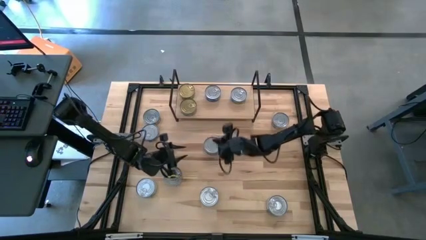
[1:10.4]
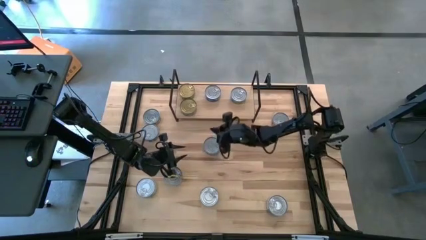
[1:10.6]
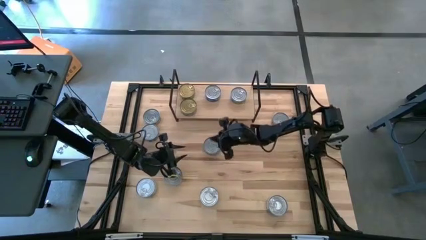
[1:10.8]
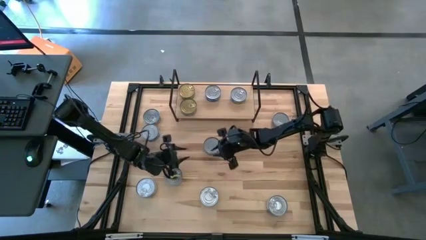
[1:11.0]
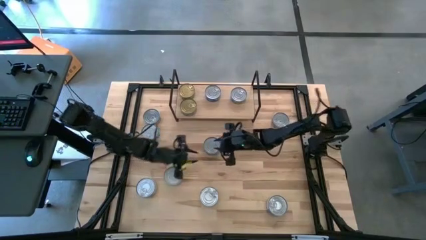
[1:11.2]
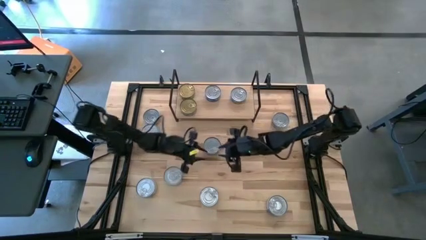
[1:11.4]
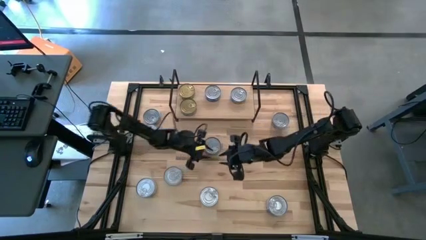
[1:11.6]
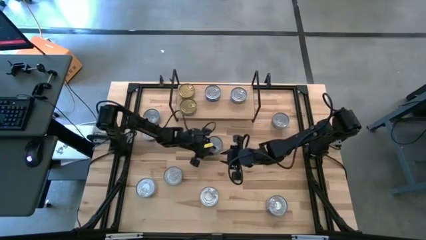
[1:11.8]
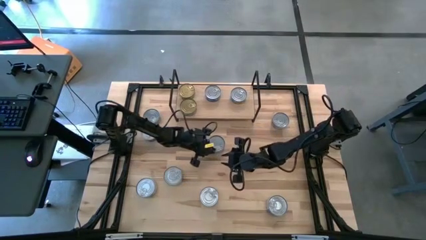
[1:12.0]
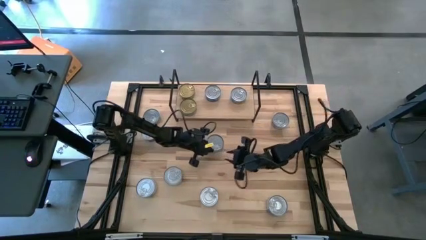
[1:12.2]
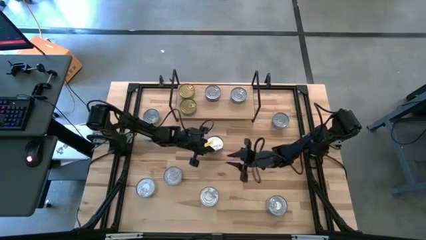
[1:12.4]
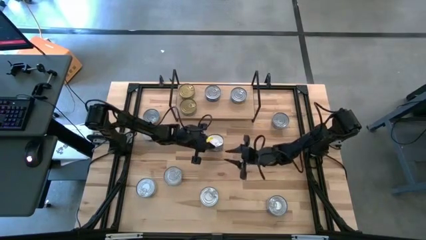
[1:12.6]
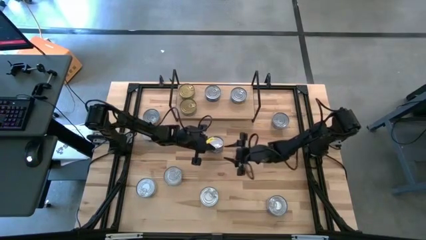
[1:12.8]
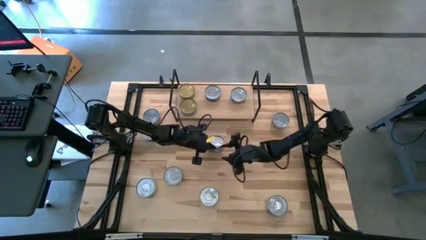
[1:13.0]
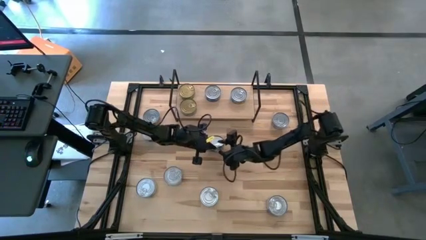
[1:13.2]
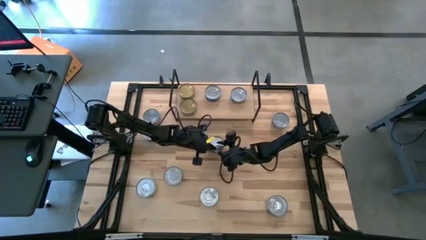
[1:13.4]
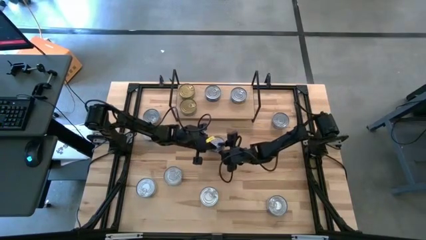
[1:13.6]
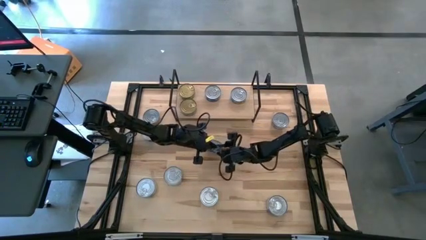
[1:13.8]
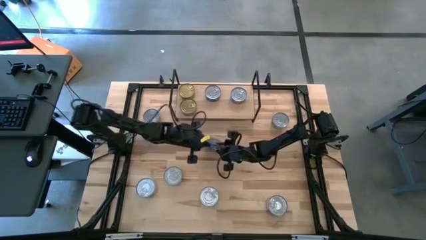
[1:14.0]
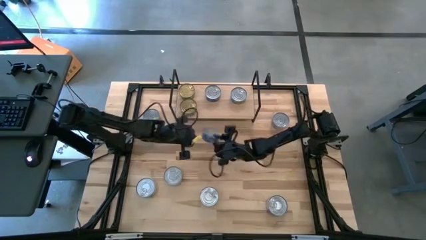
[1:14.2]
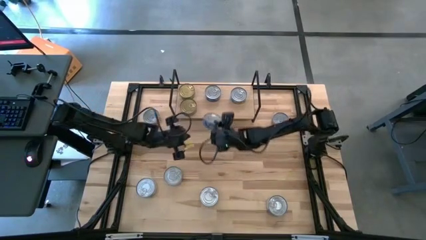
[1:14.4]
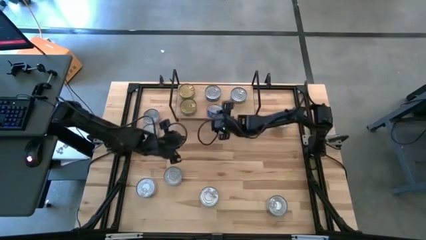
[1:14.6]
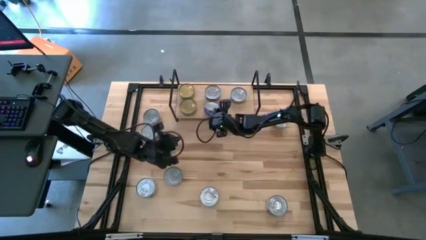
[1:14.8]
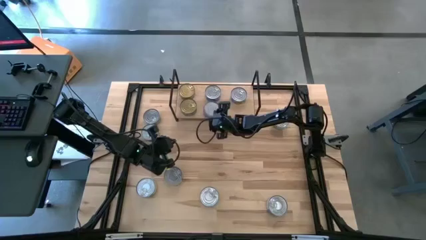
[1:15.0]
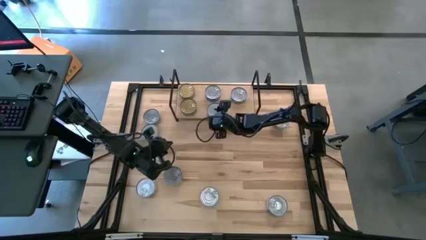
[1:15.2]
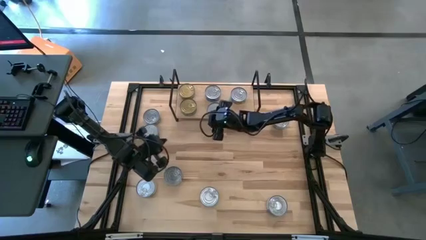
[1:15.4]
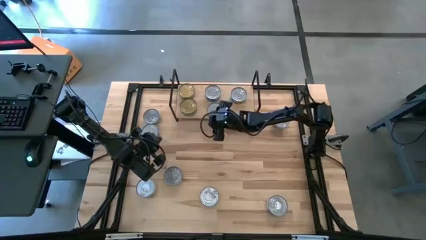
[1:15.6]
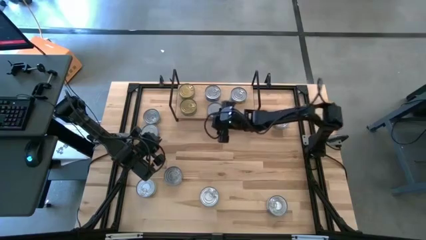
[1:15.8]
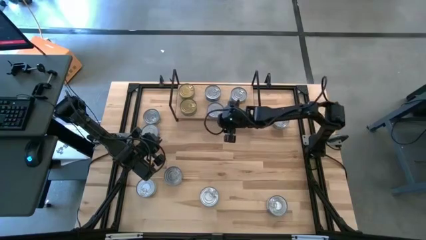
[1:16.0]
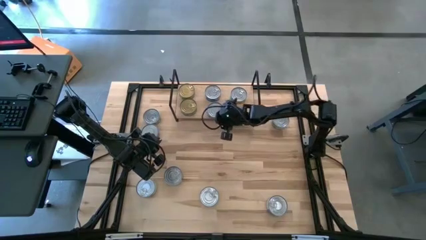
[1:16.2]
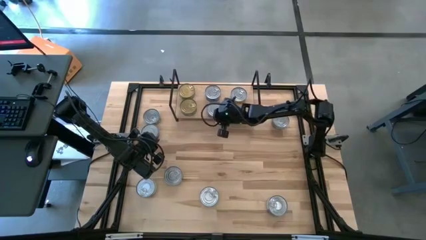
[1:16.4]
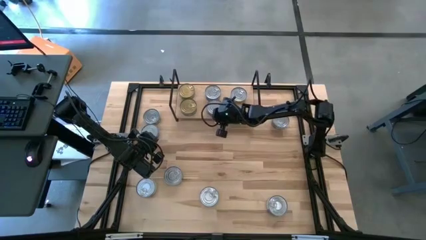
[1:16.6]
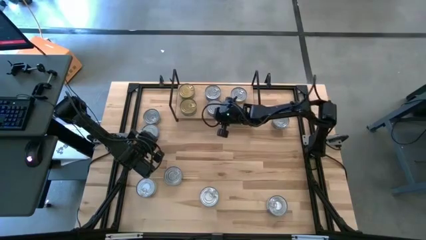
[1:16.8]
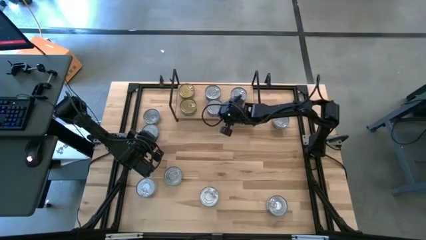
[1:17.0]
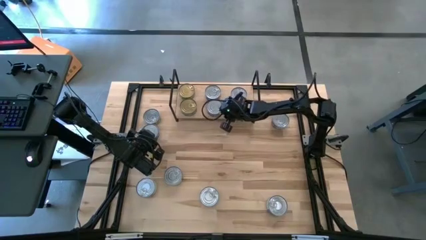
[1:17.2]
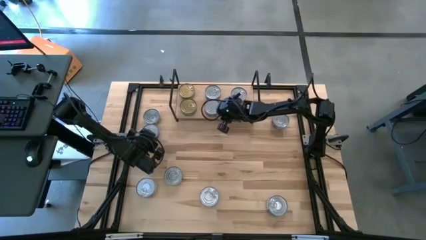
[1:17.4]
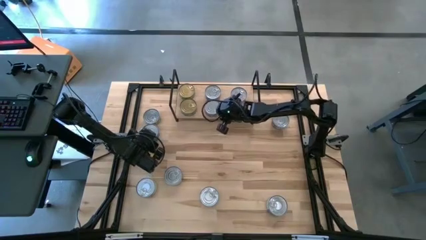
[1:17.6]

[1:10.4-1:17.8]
Task: Stack canned seafood by type on shelf
Put the blue tuna can on the shelf

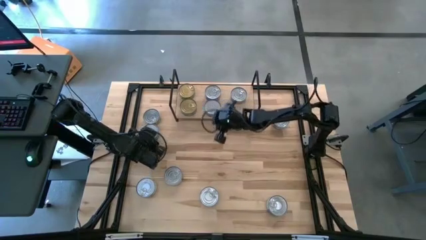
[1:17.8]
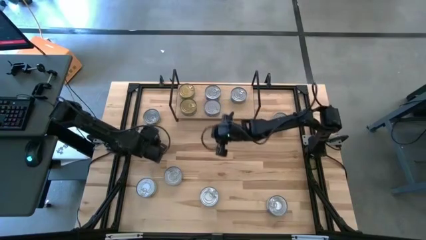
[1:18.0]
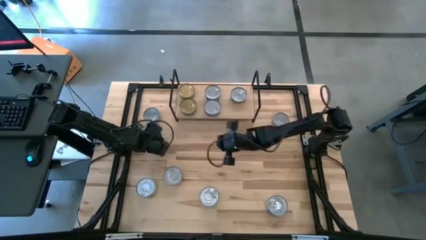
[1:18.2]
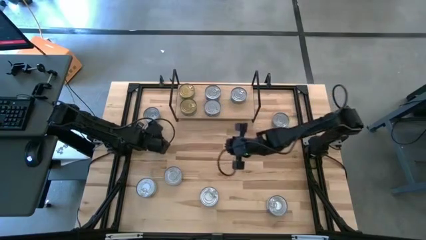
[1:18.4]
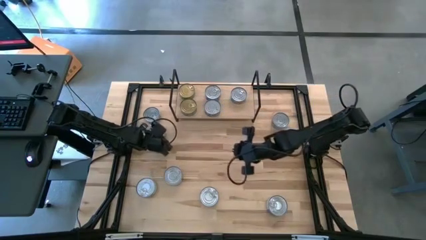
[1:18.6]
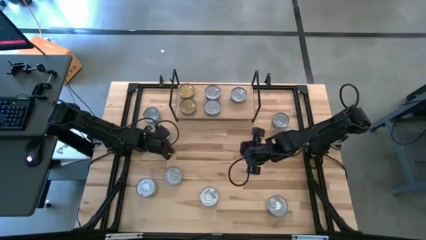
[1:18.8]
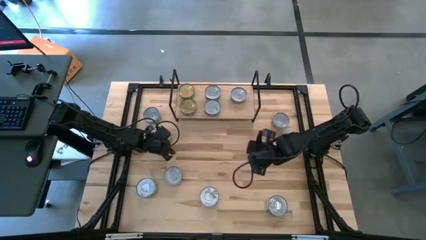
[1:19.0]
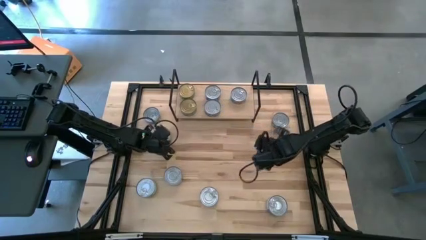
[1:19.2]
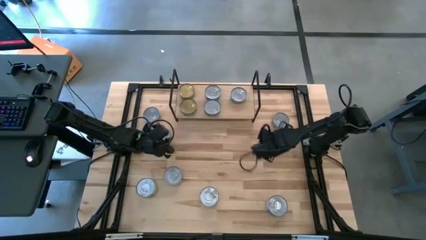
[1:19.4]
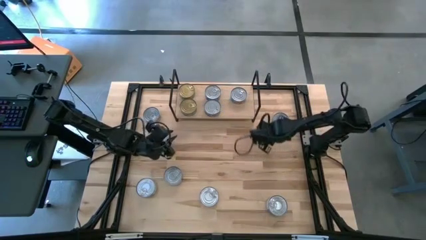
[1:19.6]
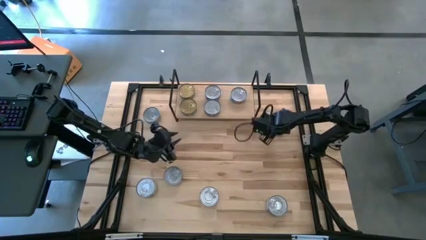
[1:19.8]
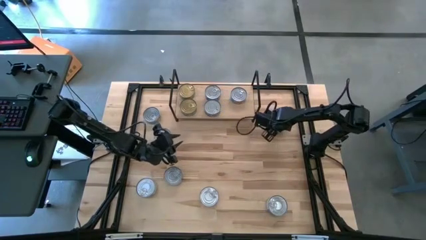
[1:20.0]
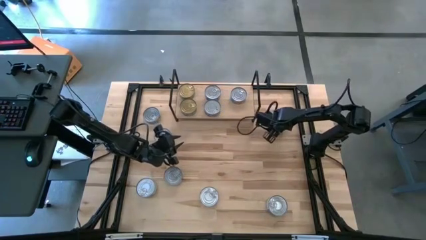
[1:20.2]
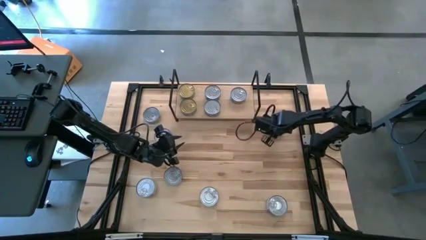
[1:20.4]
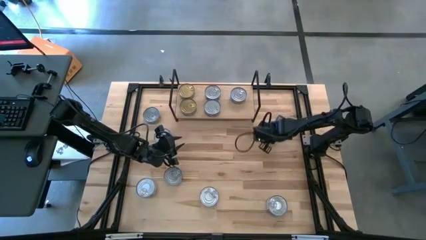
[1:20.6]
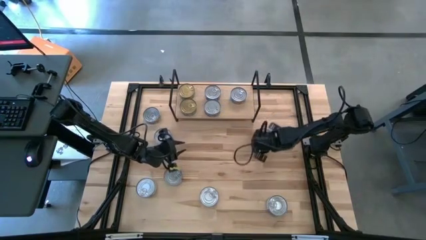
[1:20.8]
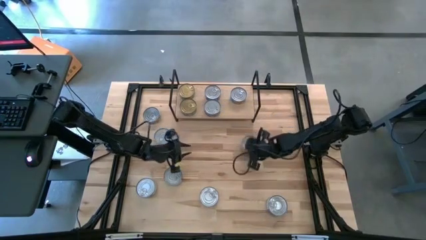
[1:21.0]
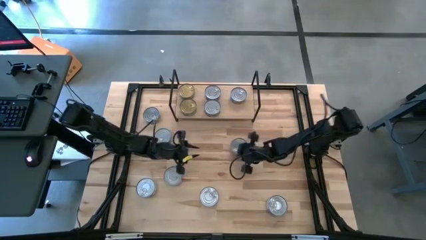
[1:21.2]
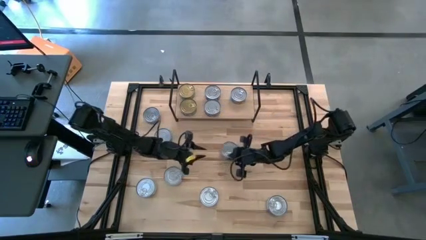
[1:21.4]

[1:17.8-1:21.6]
Put the yellow blue tuna can on the shelf

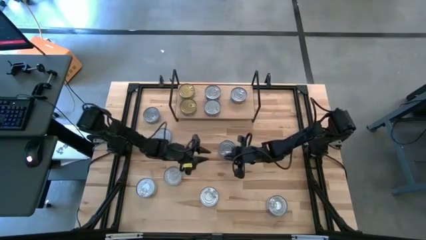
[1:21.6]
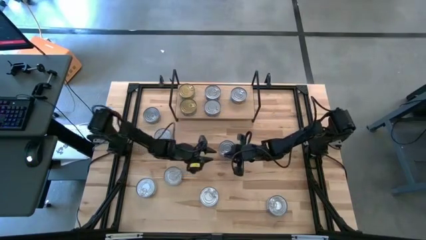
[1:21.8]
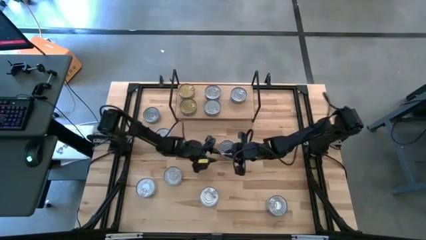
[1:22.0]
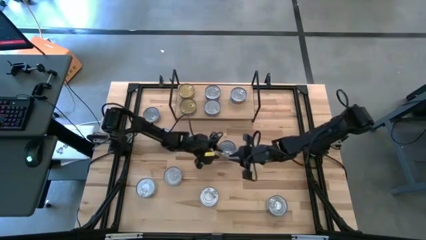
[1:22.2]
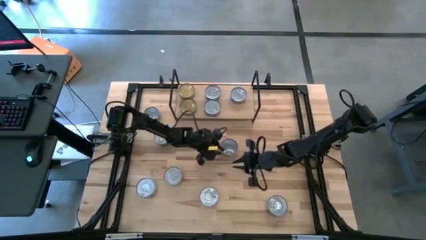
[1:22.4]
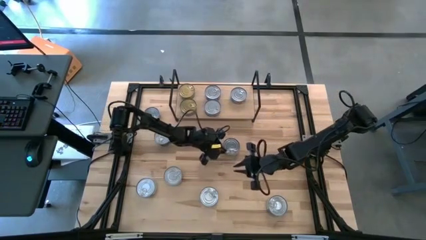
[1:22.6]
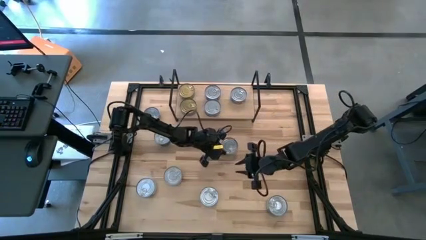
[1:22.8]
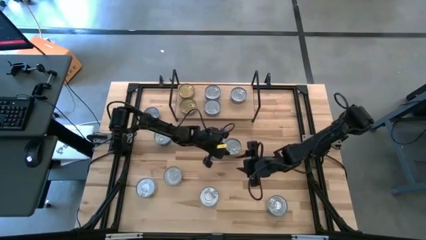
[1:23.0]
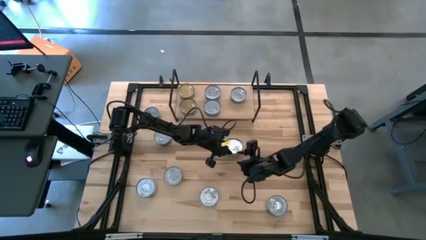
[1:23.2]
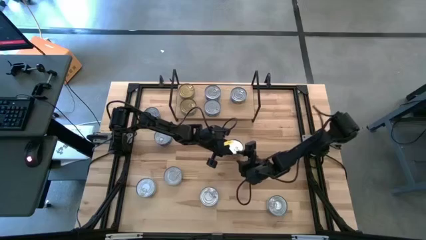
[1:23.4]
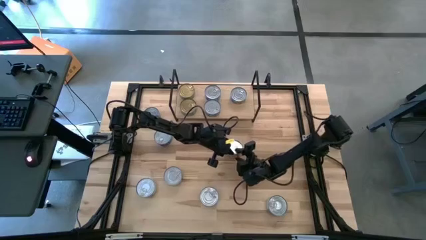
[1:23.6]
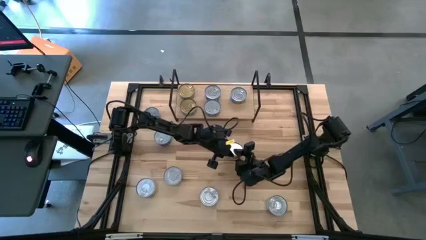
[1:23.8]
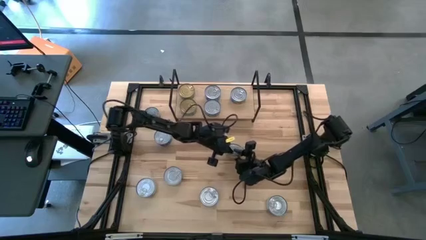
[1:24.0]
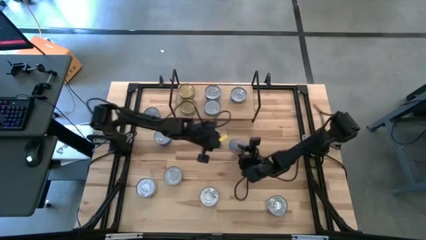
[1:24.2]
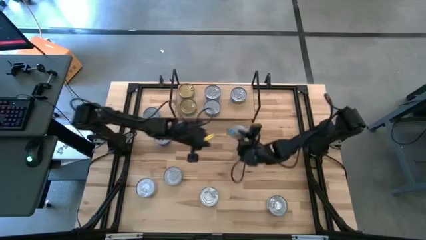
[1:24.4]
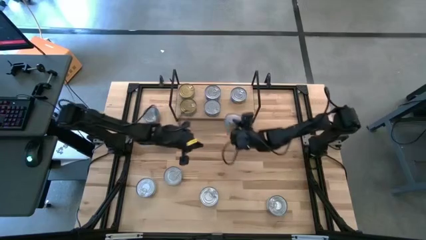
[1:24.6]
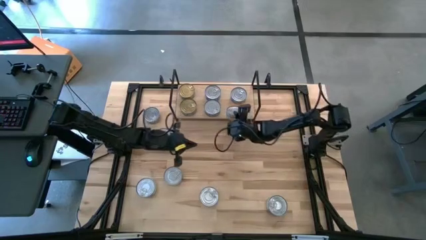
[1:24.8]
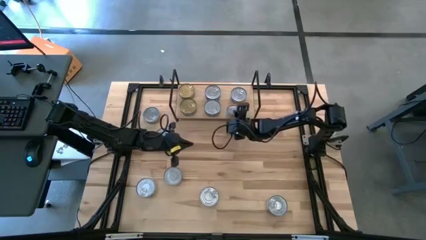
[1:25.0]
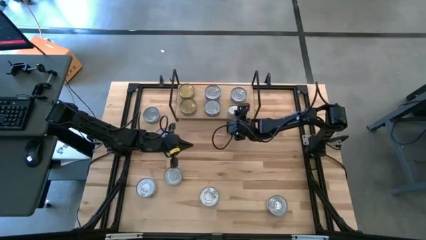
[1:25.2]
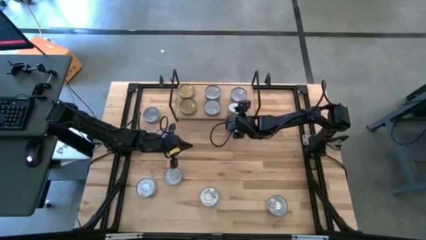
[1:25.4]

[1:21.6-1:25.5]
Put the yellow blue tuna can on the shelf

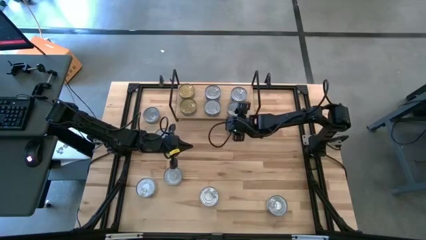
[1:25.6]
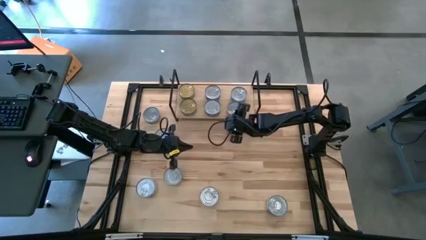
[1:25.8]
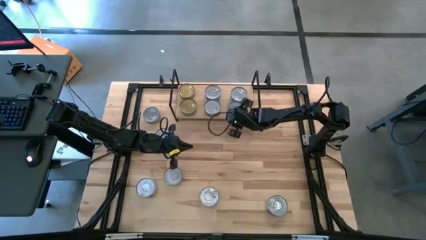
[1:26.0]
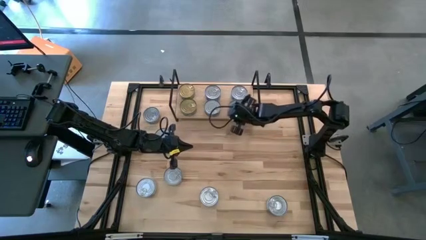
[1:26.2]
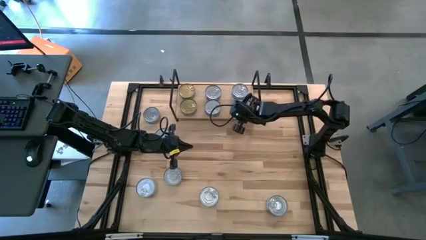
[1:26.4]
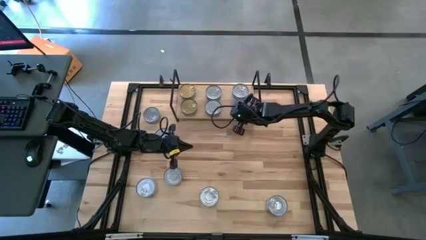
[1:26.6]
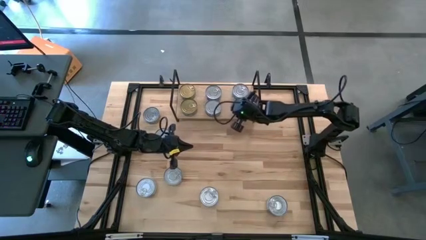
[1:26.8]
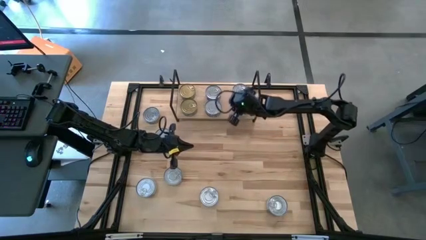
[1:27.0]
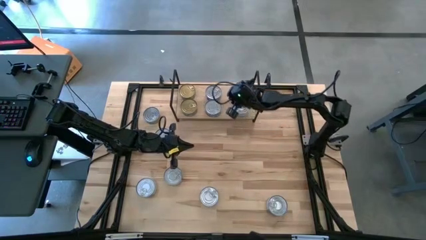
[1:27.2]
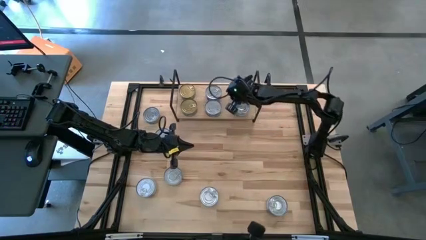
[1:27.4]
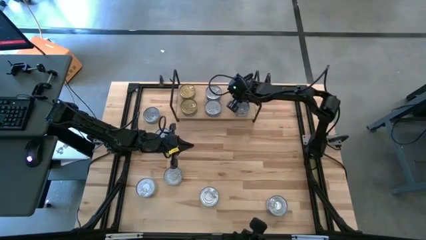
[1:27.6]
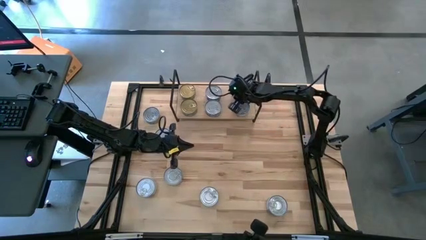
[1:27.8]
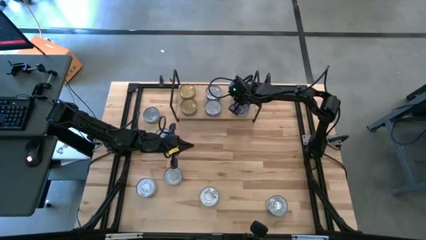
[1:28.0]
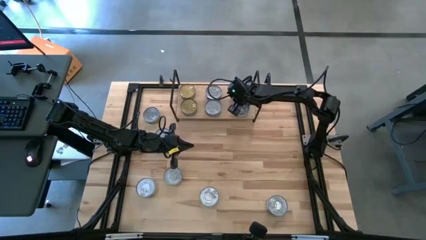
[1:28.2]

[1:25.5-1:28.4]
Adjust the yellow blue tuna can on the shelf
